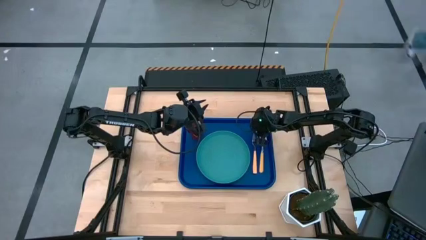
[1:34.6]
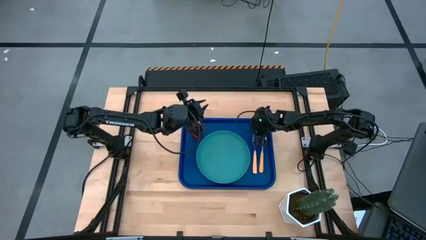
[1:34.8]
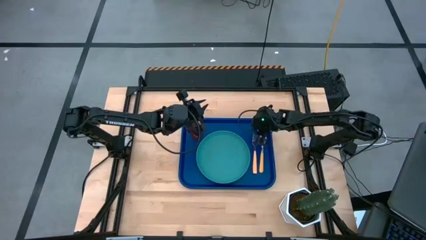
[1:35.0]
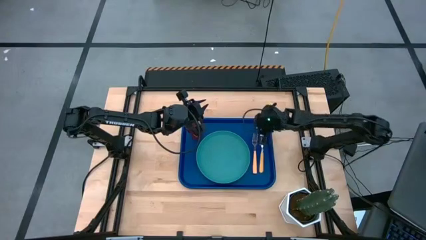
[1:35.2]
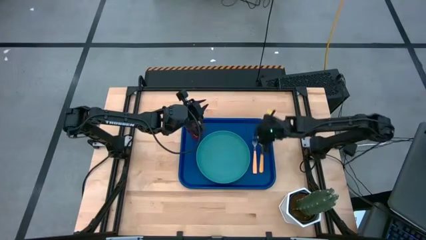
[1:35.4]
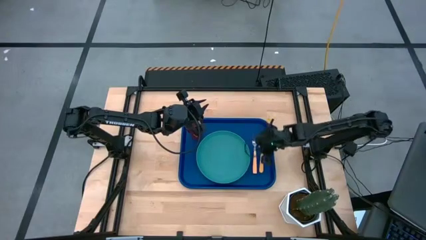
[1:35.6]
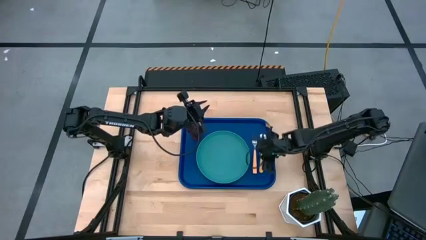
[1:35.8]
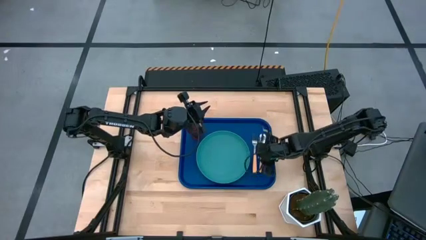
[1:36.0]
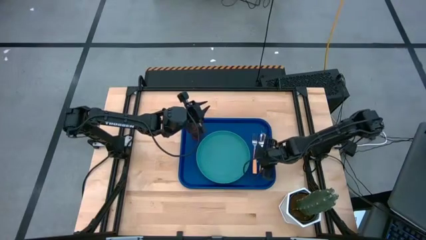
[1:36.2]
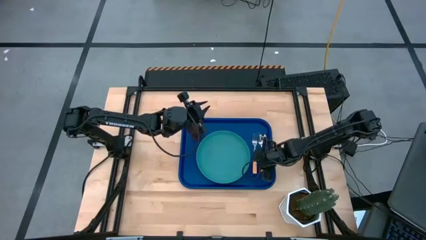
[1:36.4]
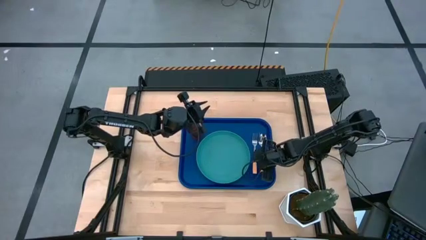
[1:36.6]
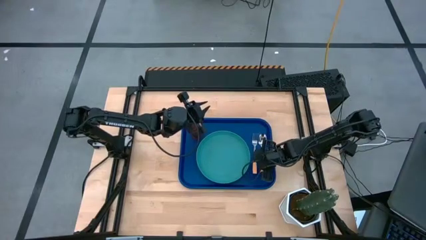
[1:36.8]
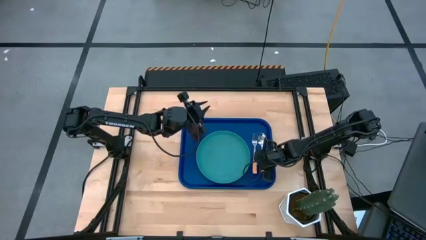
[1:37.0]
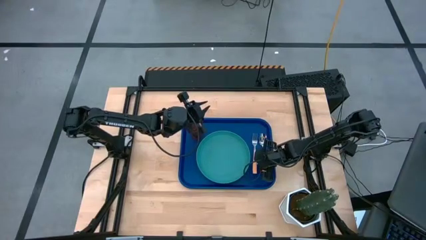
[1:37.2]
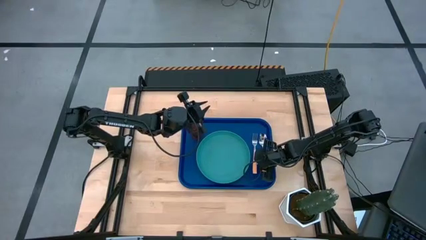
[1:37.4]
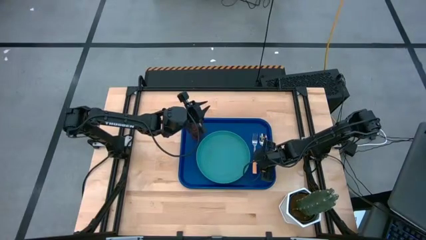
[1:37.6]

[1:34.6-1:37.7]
Task: Pick and place plate/cup/fork/spoon on tray
Adjust the orange spoon on the blue tray

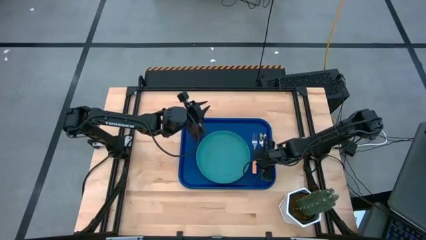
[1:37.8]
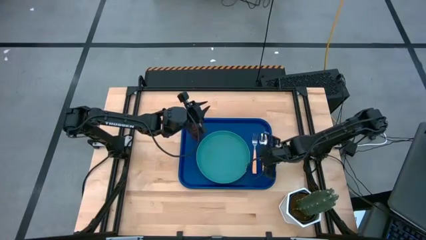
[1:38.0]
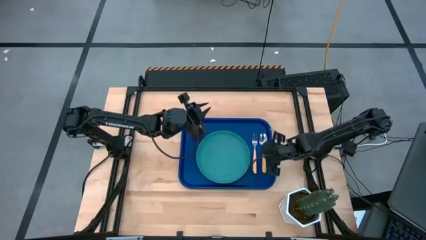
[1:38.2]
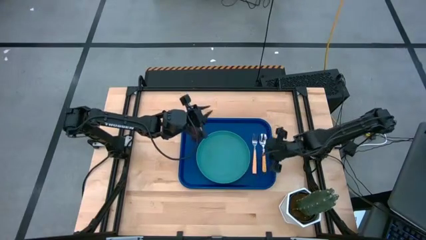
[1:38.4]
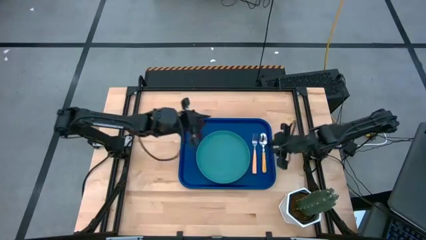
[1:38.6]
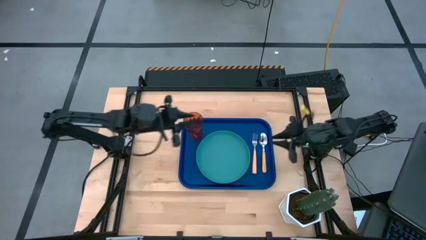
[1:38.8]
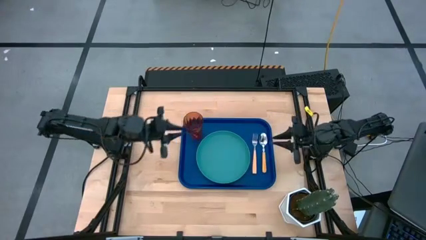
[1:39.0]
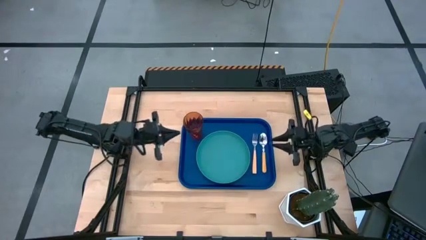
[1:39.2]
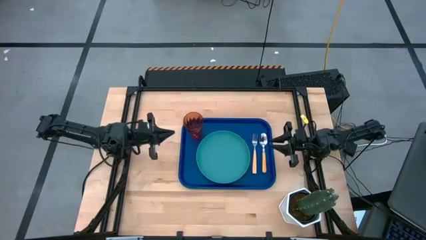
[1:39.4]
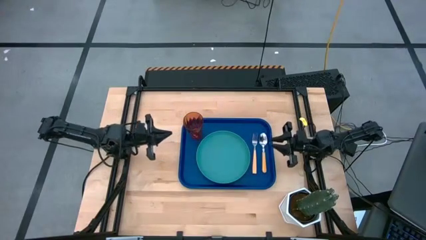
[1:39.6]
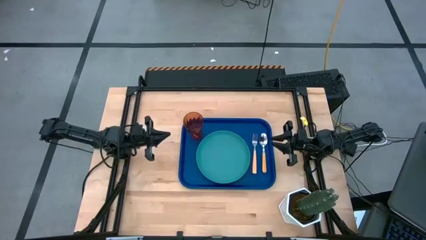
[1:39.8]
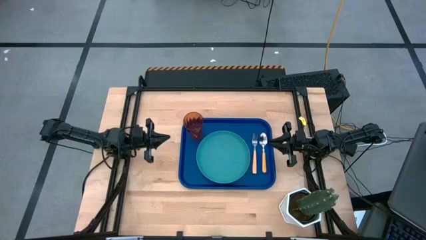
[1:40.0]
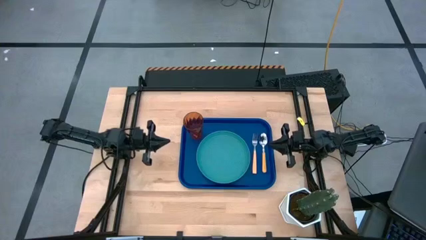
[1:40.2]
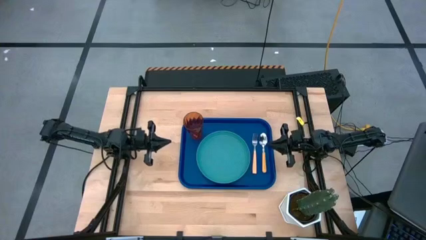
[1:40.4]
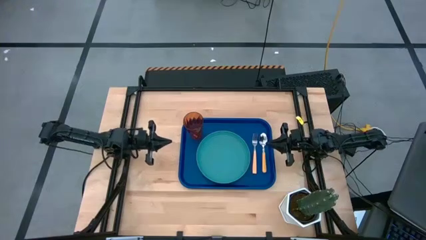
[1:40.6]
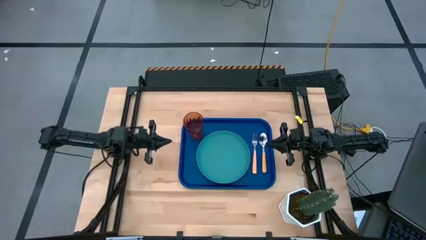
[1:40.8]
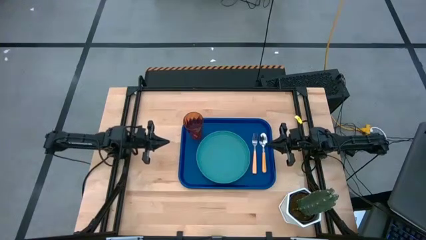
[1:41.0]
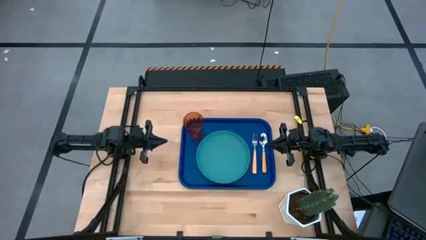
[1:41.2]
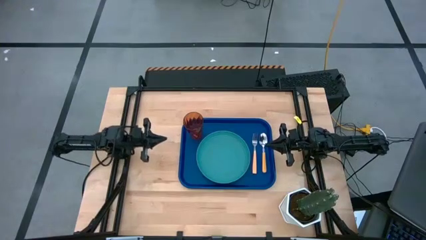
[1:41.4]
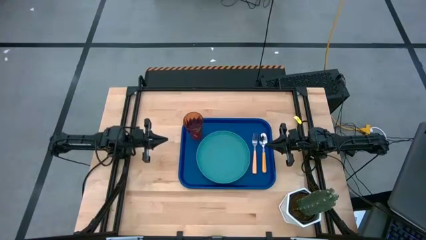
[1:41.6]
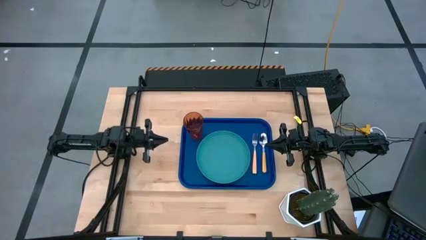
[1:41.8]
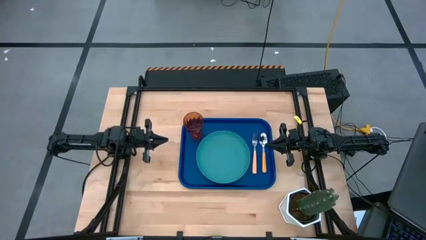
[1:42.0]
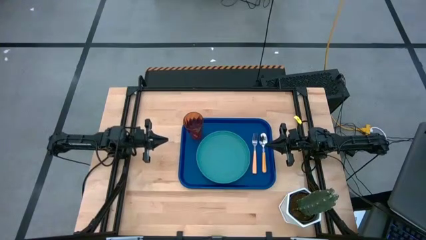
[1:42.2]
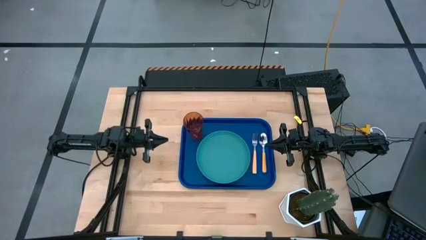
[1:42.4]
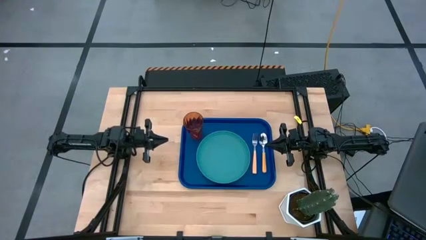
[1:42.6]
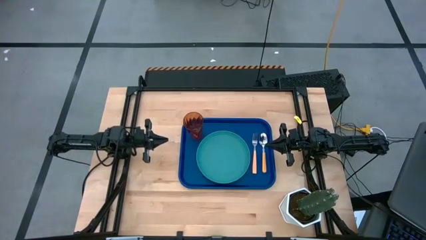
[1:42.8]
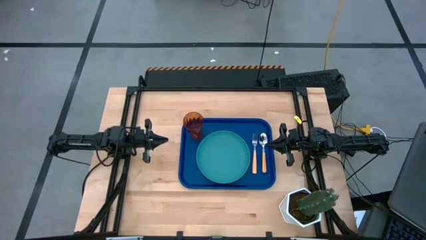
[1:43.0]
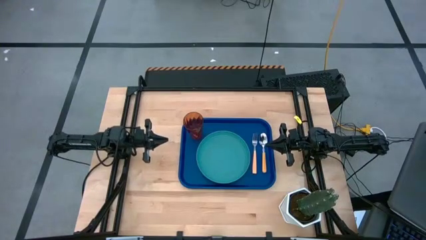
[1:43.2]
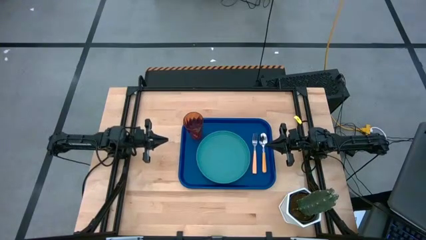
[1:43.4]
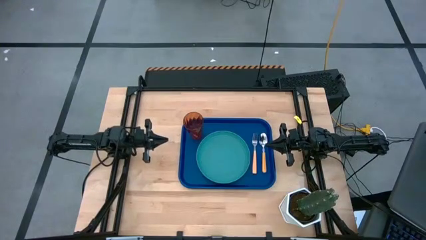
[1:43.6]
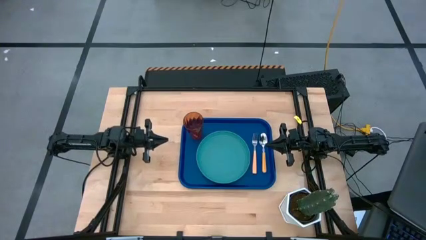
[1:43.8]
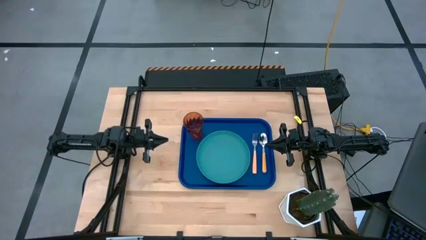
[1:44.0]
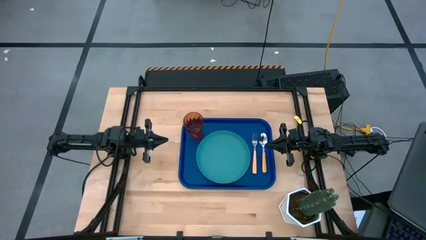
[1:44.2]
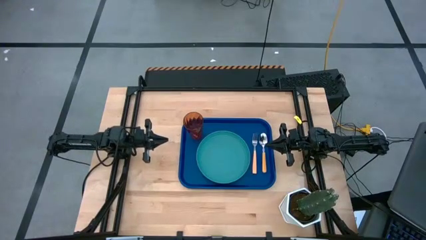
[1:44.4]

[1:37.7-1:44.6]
Return to Home Position

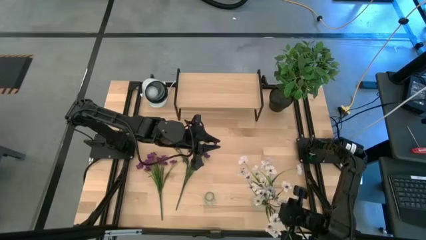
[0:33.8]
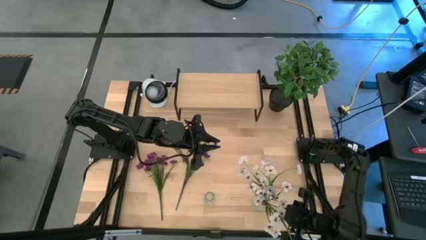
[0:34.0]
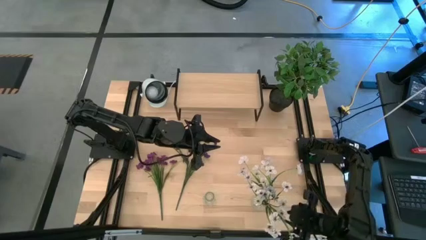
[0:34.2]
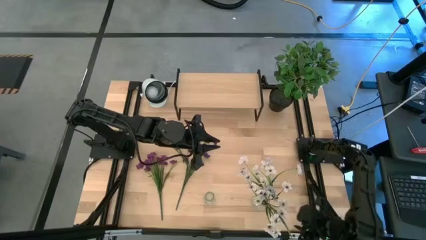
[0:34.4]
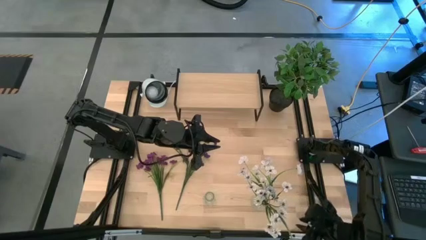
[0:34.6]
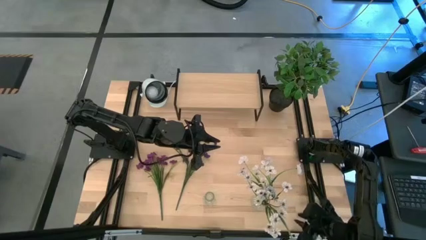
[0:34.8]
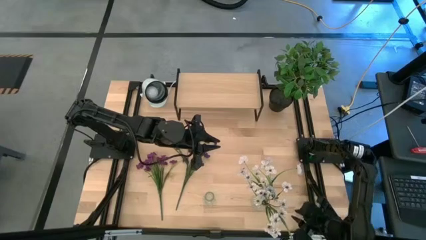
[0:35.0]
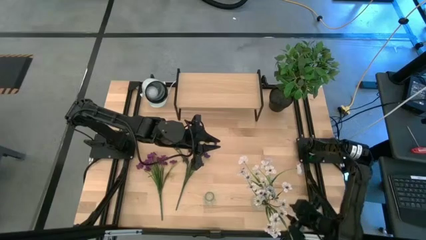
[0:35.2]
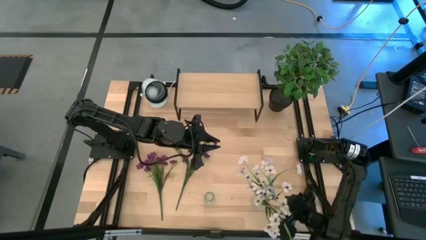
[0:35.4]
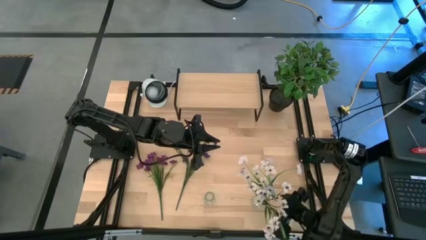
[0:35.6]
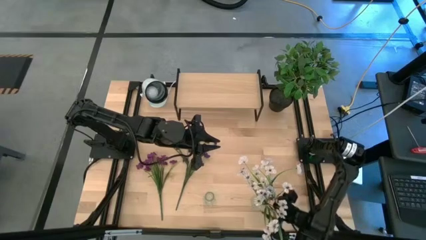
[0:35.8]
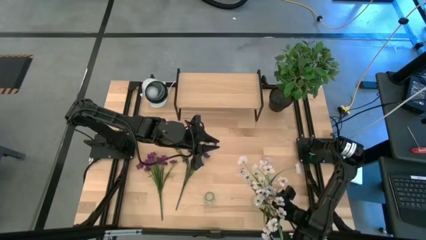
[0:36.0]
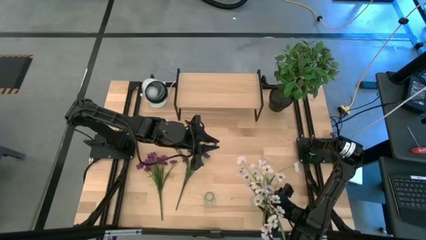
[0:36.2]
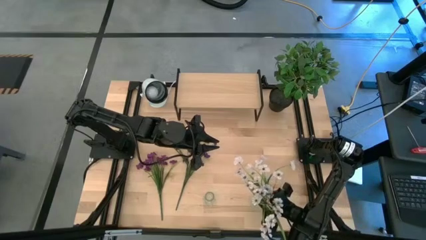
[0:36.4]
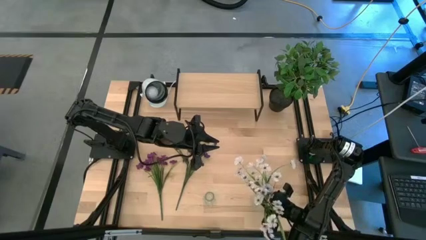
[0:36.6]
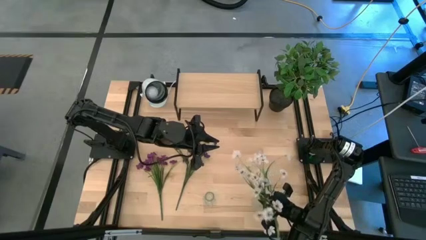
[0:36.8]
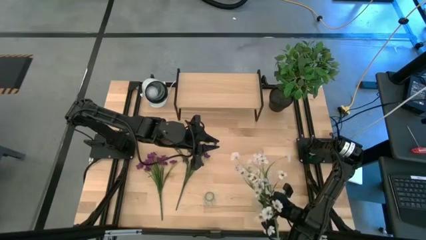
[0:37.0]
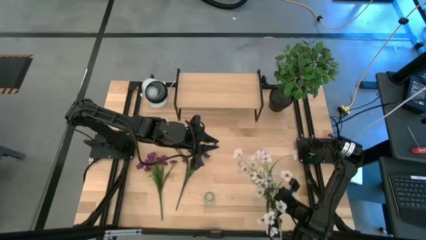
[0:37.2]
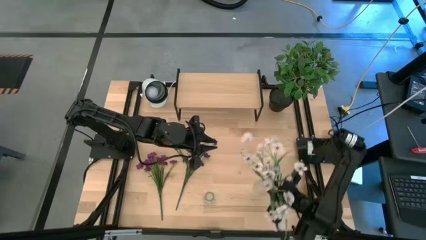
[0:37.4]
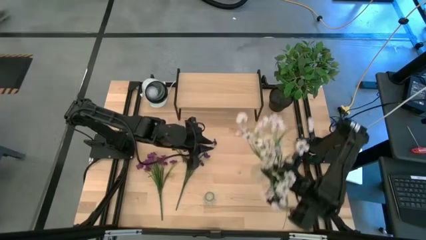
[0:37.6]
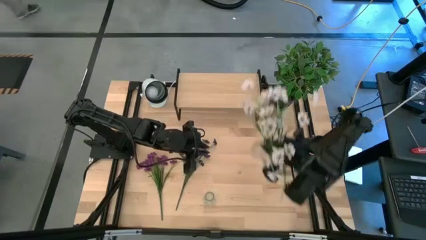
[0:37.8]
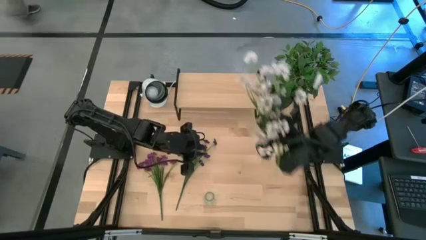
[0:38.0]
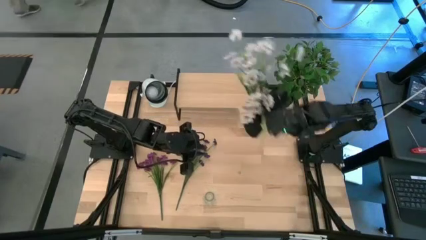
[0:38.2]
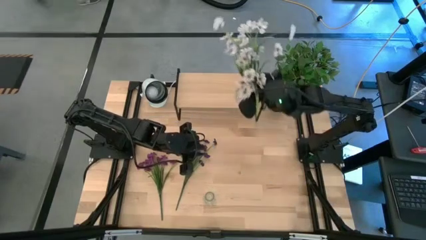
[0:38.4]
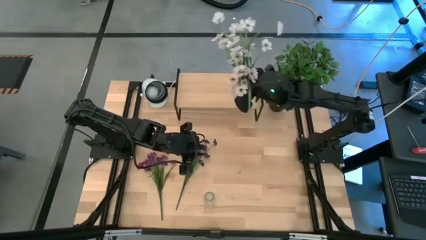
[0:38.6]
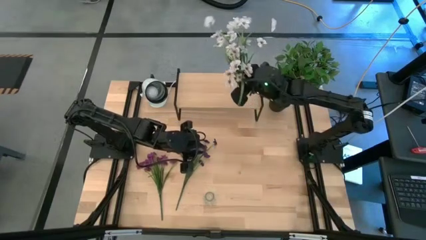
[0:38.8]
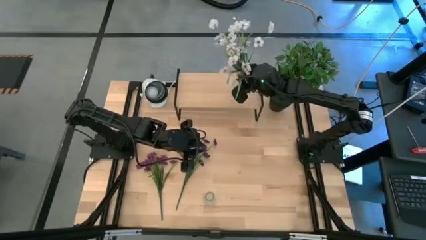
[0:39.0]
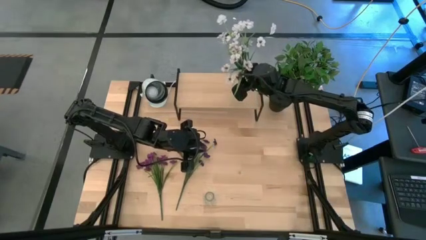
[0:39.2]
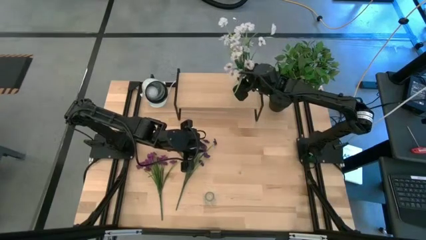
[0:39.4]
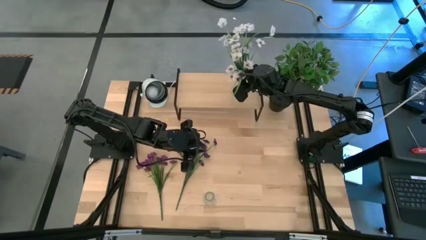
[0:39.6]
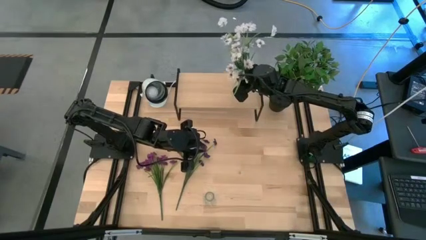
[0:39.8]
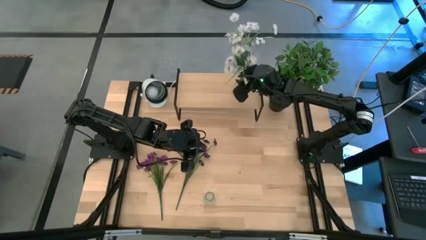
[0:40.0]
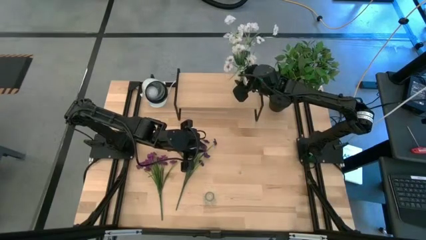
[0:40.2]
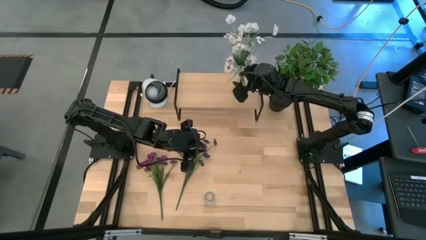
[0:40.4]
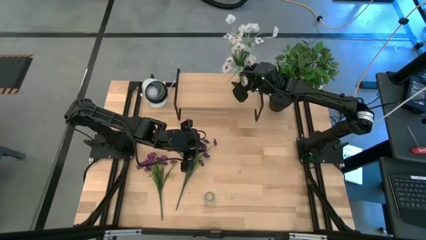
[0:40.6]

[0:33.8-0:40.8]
Task: Pick and place flowers into a vace then onto a shelf
Put the right transparent vase on the shelf
